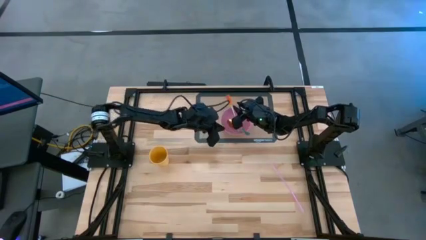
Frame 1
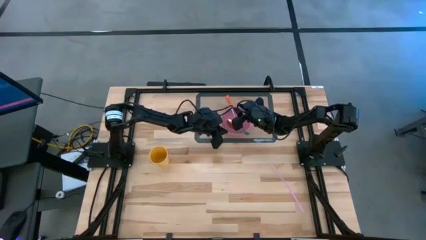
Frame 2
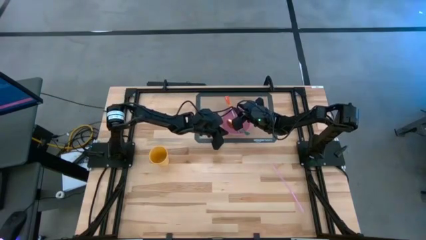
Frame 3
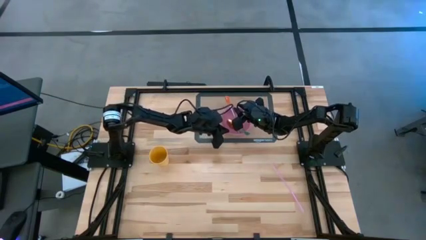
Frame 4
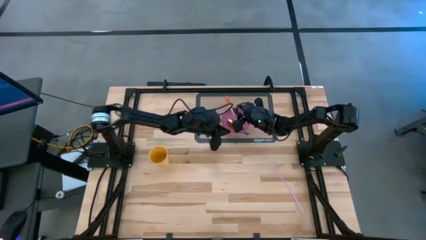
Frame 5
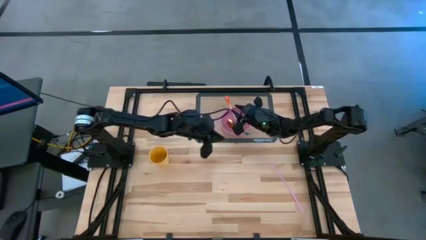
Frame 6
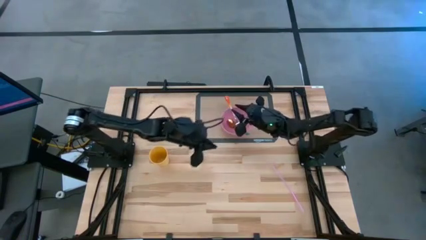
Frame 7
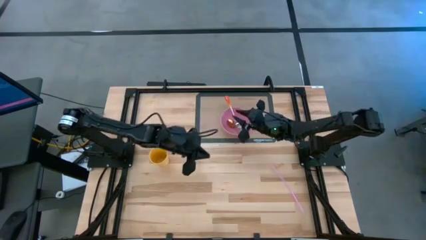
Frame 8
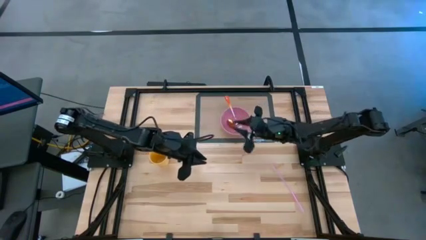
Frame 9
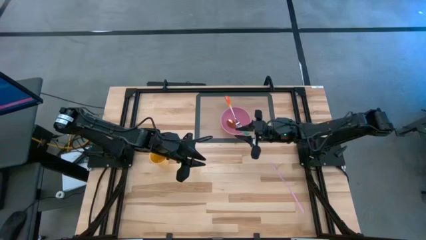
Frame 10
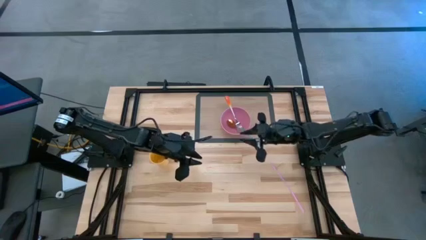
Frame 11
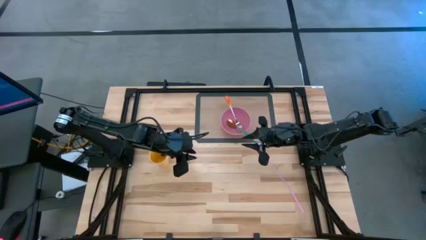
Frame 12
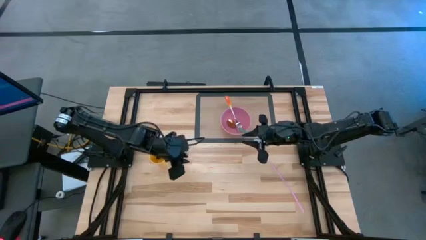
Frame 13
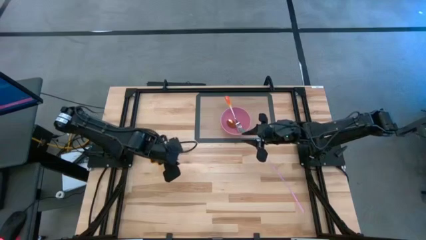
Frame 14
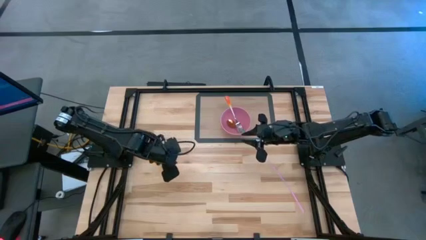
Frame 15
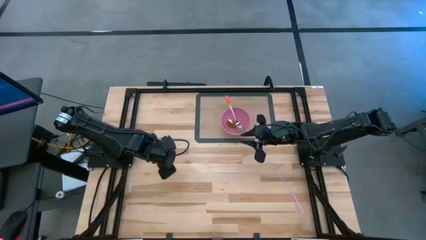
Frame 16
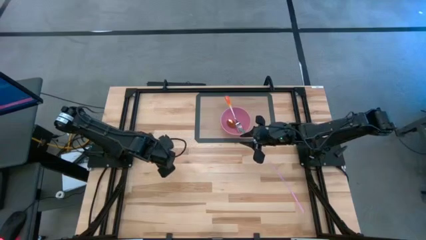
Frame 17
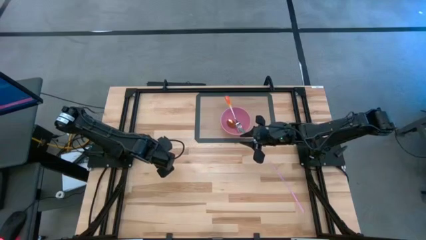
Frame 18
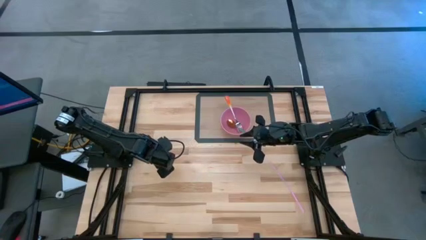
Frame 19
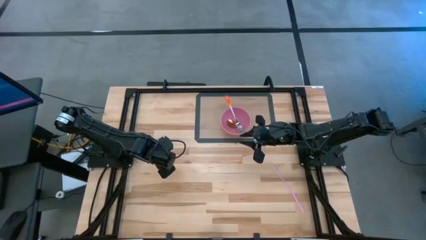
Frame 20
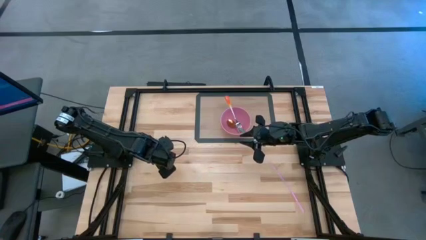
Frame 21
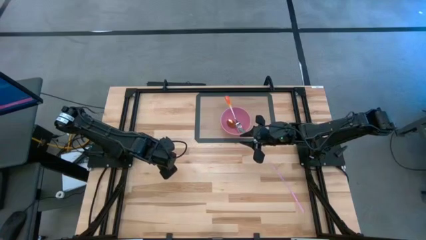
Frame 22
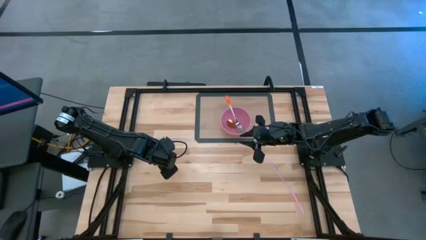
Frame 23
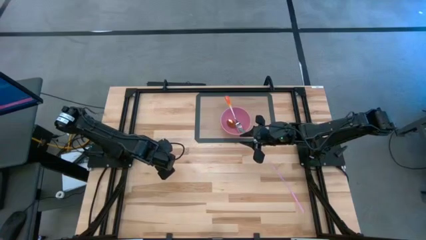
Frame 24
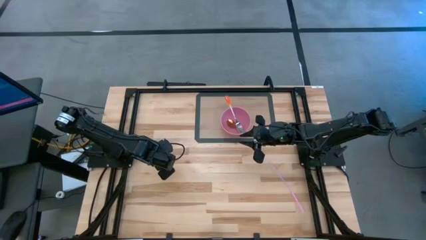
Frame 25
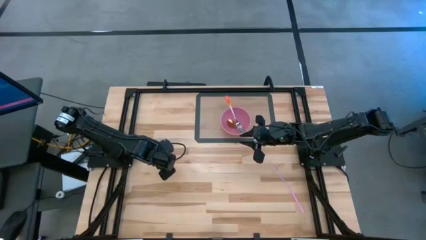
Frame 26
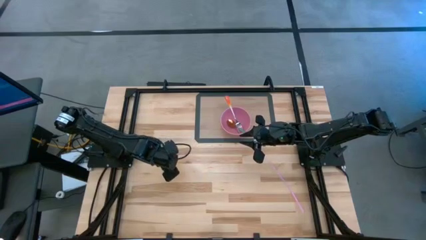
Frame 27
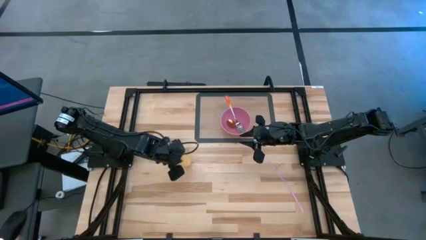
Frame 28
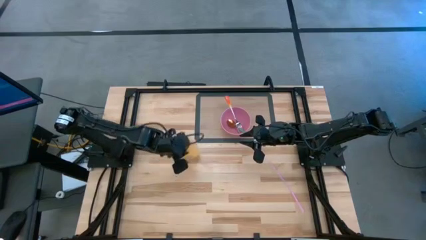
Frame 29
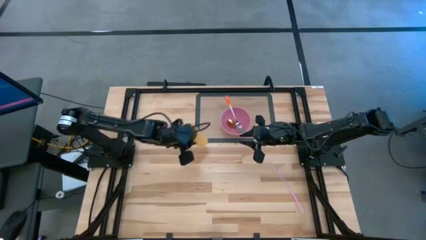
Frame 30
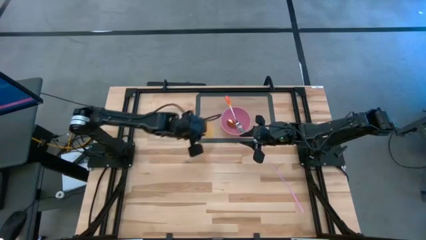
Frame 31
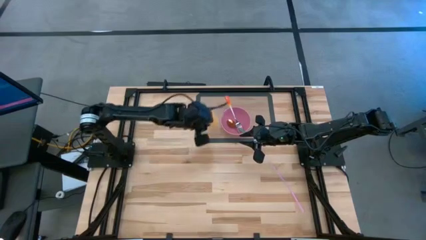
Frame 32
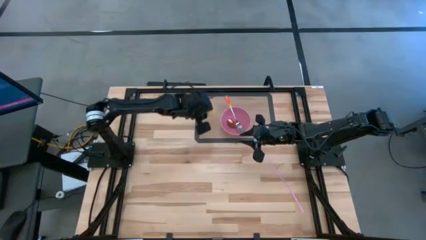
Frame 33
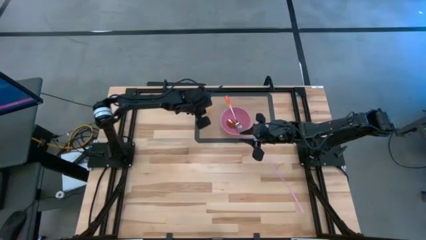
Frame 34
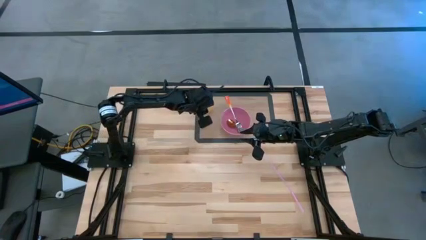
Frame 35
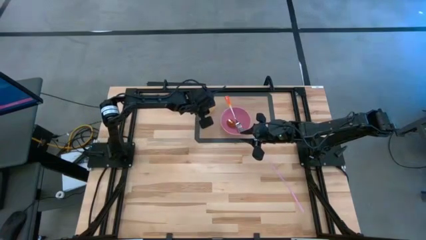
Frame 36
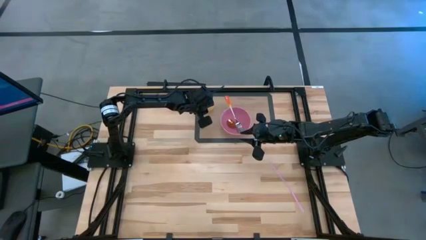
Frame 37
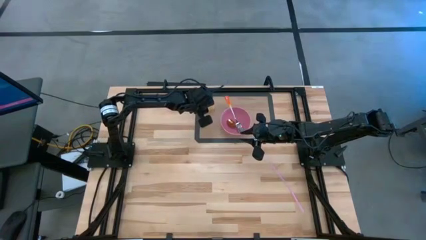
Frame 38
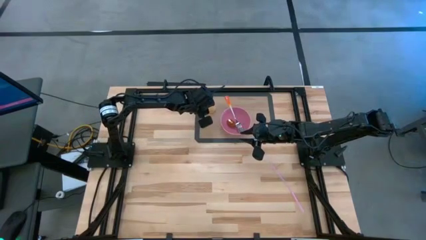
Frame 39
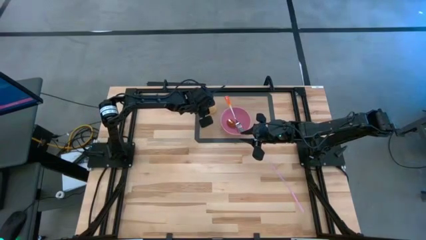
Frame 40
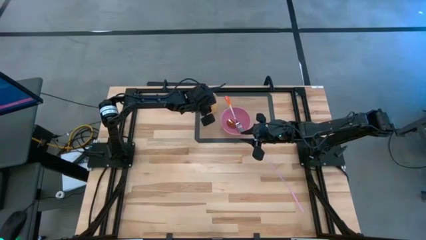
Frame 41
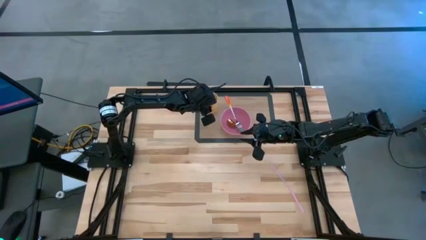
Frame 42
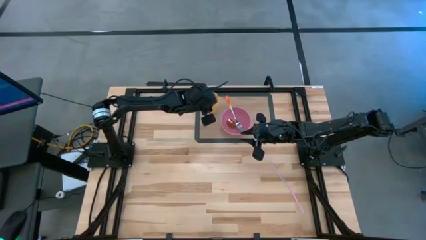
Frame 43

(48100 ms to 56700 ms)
Task: Pick & Place Utensil
Put the yellow cup on the transparent tablemat to the top left of the pink bowl

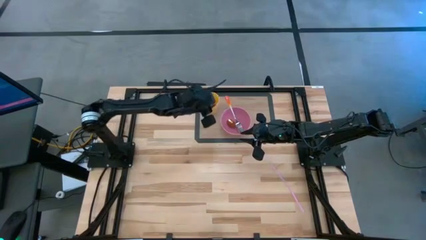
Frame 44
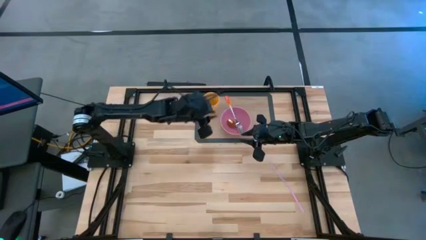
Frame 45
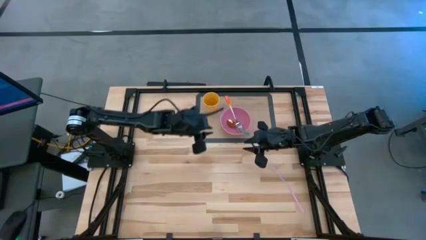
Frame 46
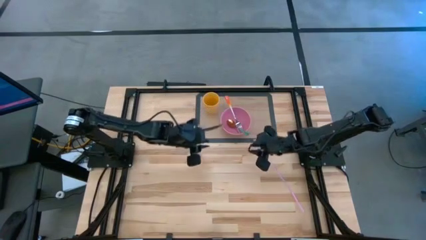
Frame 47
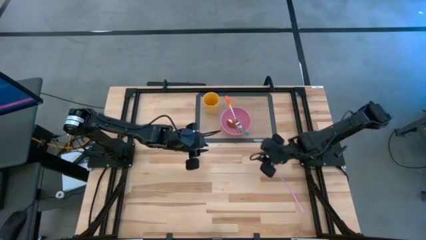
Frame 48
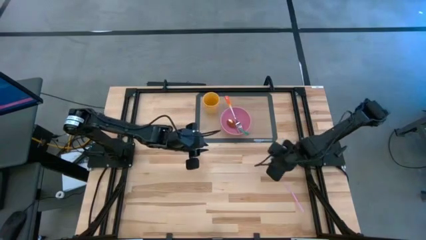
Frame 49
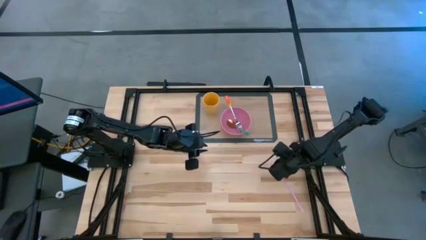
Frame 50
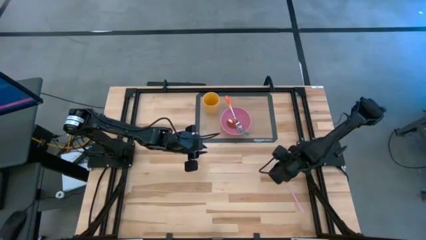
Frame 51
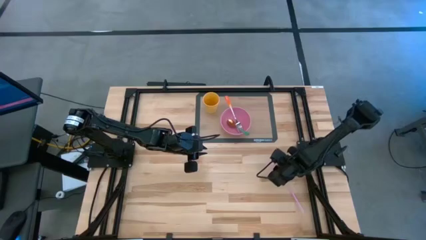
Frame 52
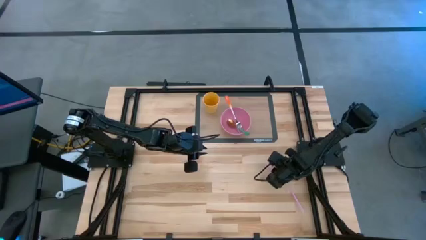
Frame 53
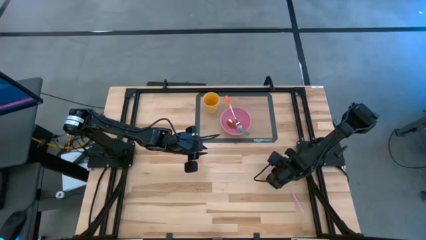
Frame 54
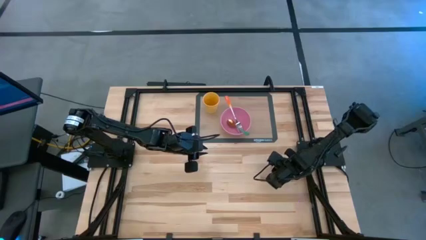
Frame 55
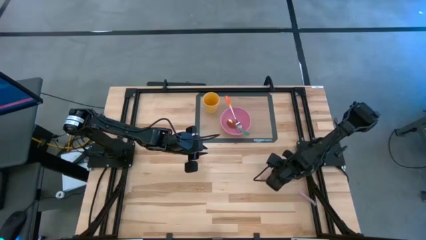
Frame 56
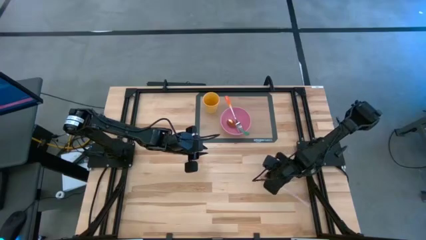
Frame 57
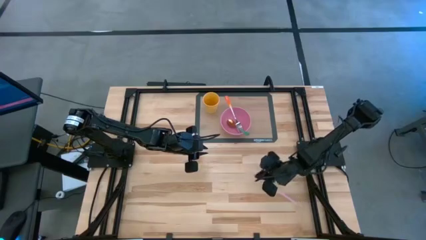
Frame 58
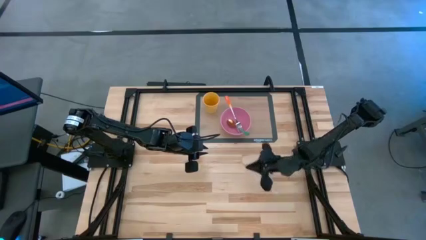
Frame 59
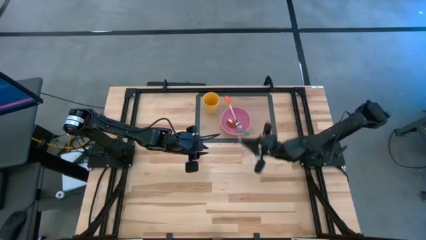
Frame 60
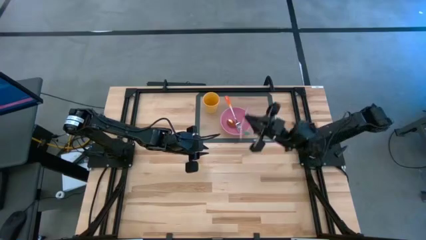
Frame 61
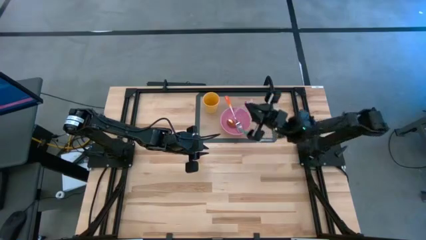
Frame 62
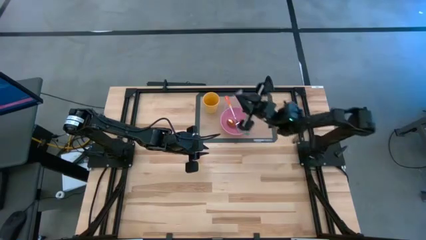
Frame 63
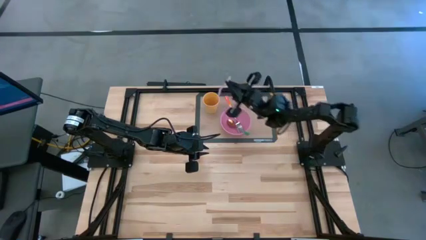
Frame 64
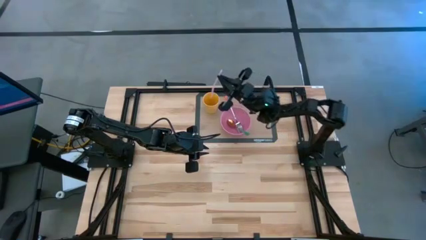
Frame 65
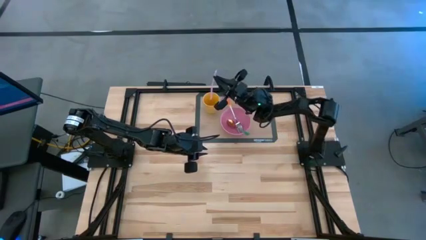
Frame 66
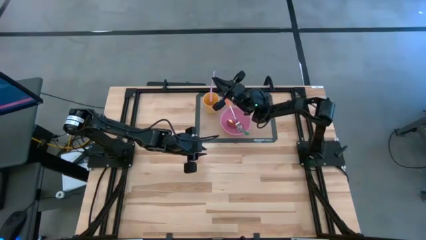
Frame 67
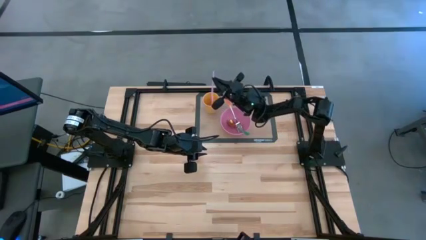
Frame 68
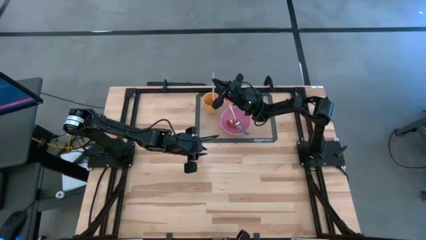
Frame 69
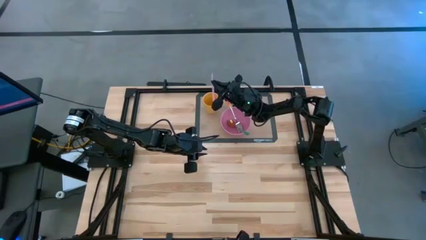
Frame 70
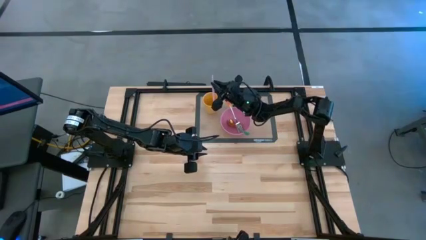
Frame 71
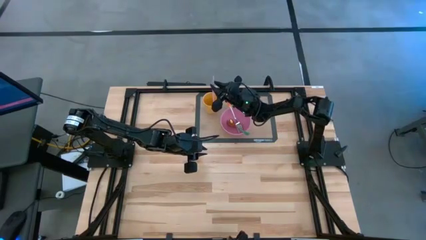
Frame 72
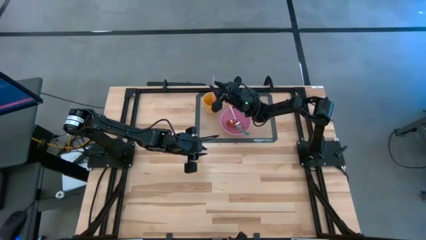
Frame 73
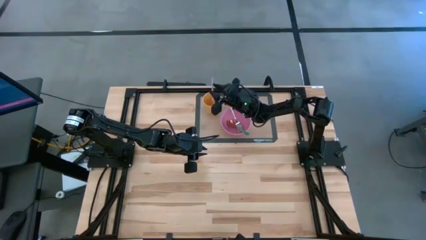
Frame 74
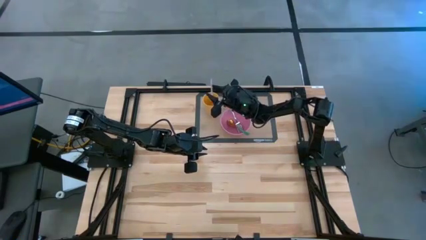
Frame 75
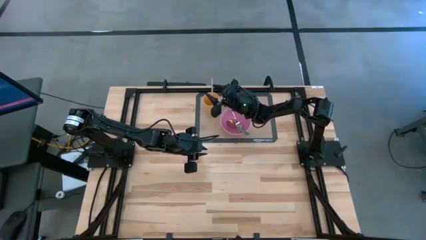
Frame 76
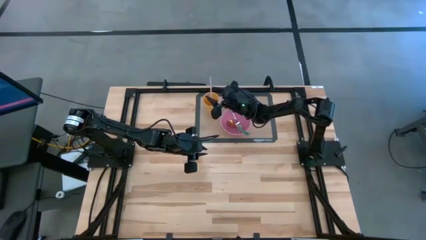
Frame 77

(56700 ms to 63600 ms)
Put the pink straw into the yellow cup

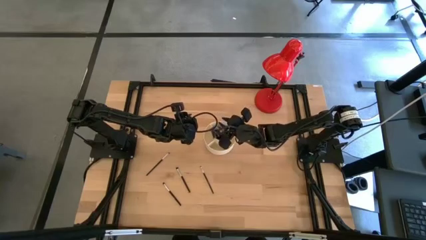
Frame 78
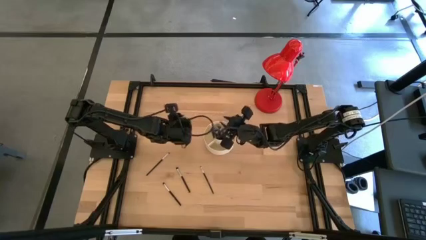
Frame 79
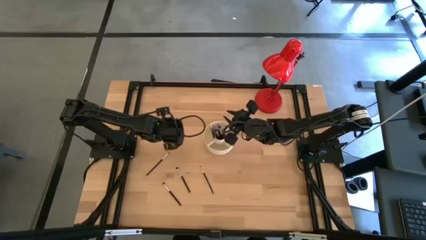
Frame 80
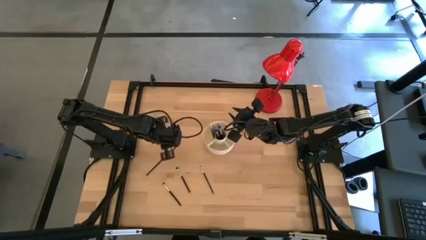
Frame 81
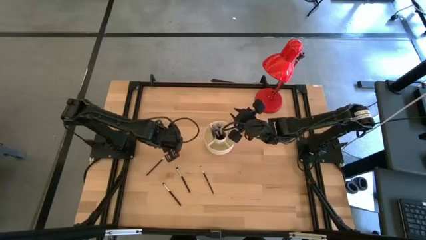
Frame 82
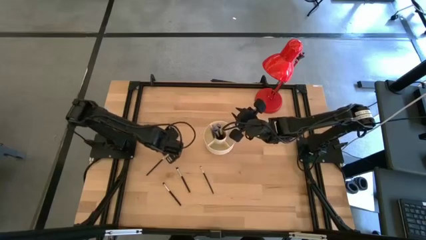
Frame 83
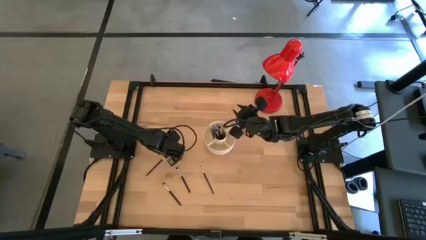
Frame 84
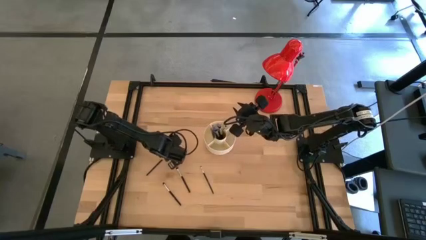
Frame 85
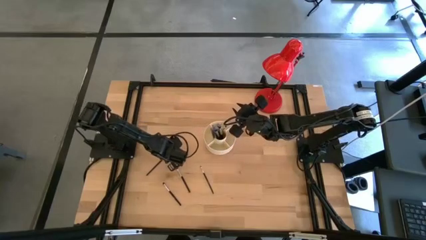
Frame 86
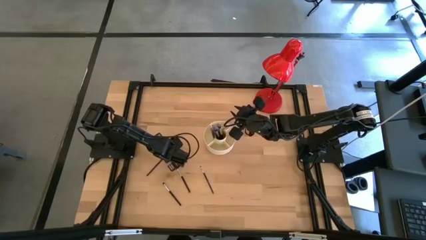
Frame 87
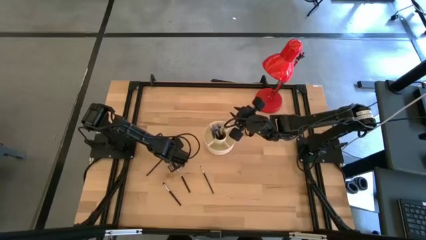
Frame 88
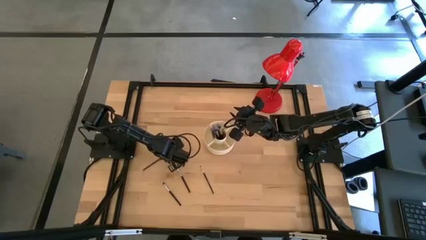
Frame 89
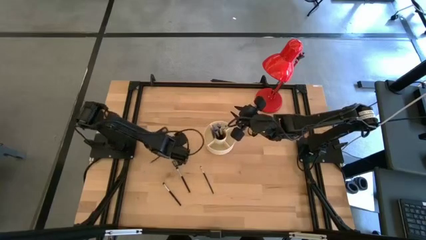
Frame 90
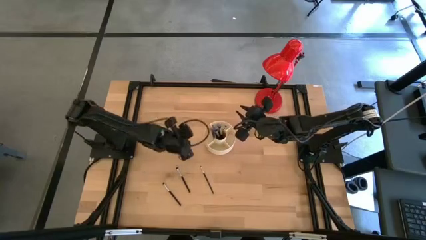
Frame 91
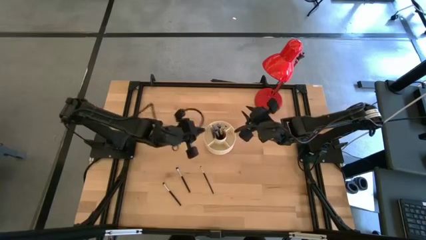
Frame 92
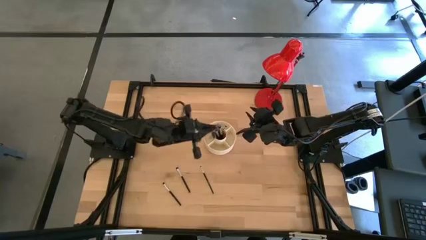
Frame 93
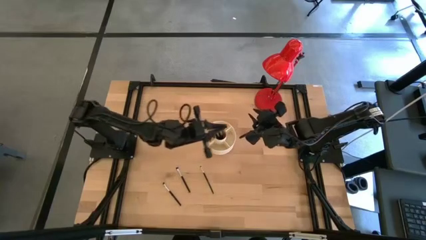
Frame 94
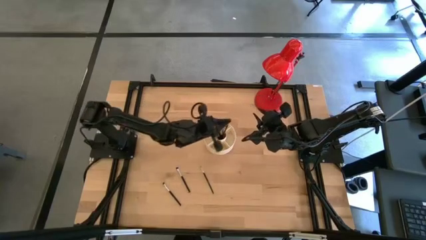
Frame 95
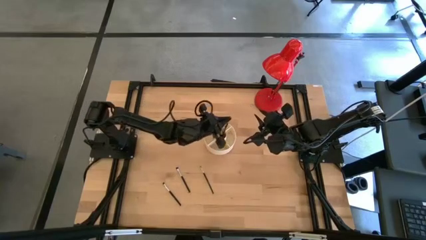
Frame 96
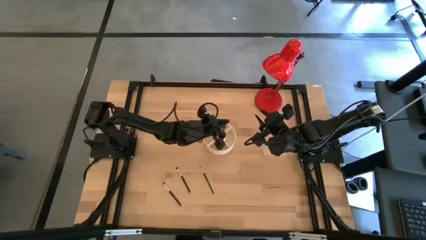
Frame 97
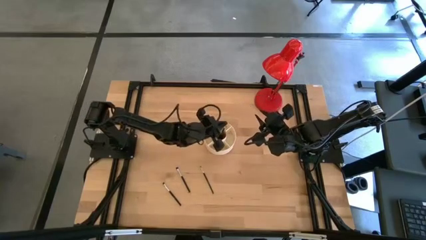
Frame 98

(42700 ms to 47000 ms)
Task: Put items in baskets/containers
Put the eyeshadow brush into the brush organizer
